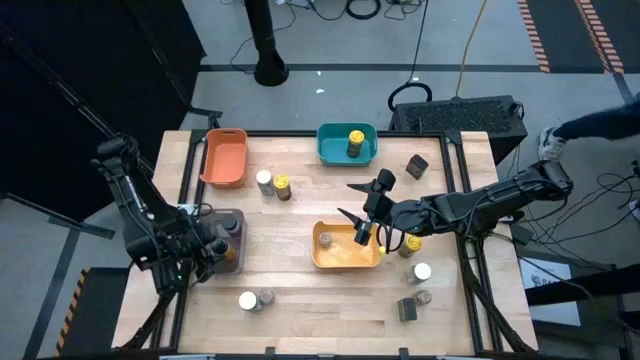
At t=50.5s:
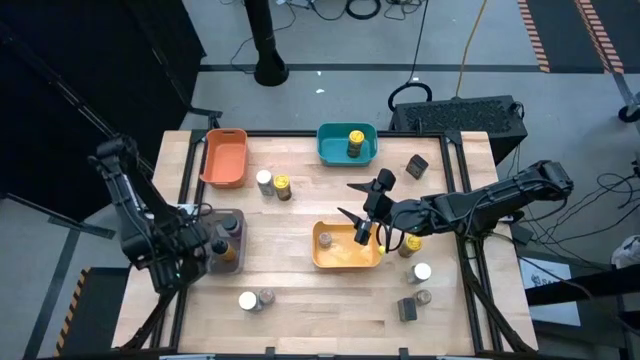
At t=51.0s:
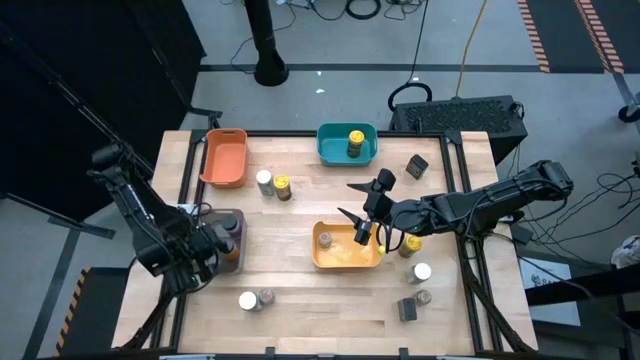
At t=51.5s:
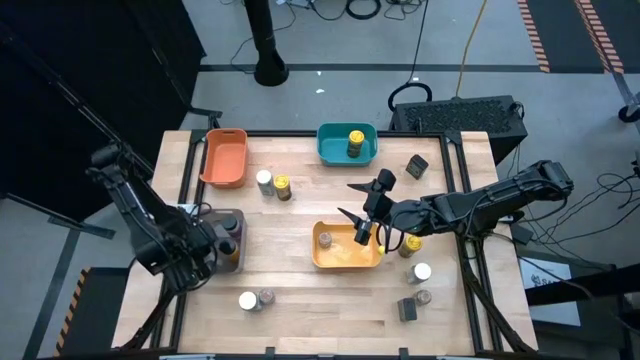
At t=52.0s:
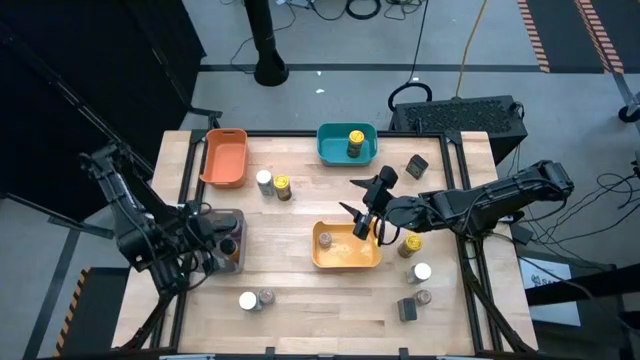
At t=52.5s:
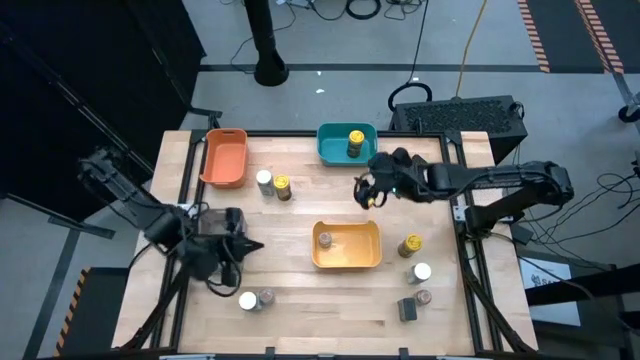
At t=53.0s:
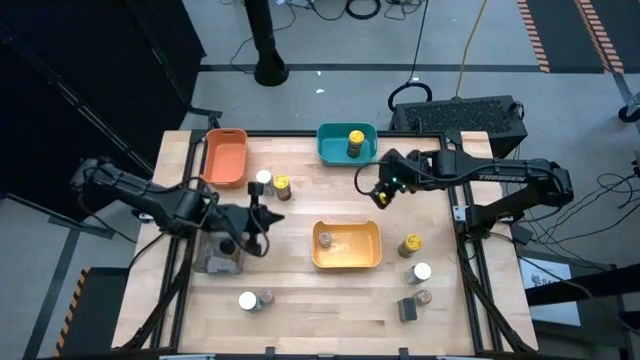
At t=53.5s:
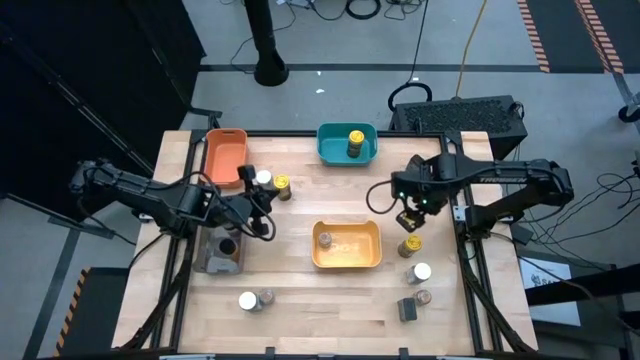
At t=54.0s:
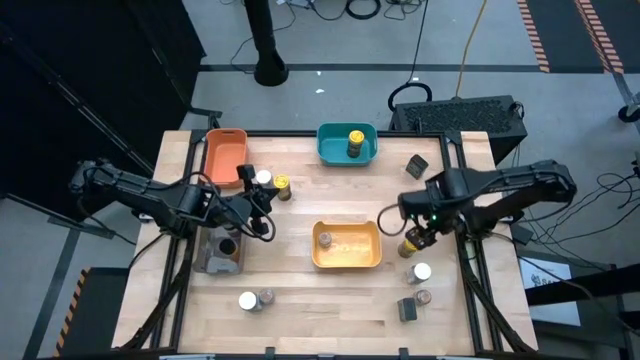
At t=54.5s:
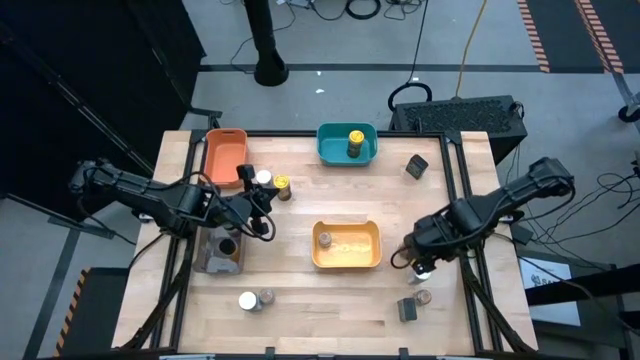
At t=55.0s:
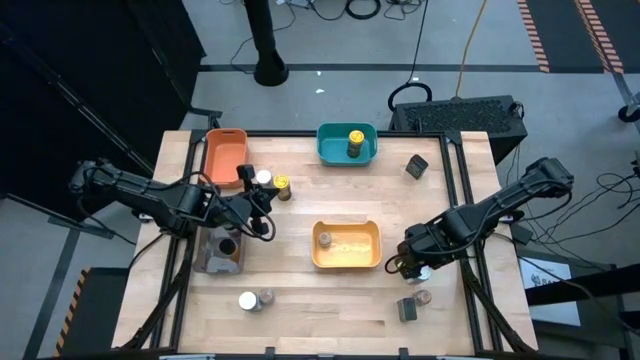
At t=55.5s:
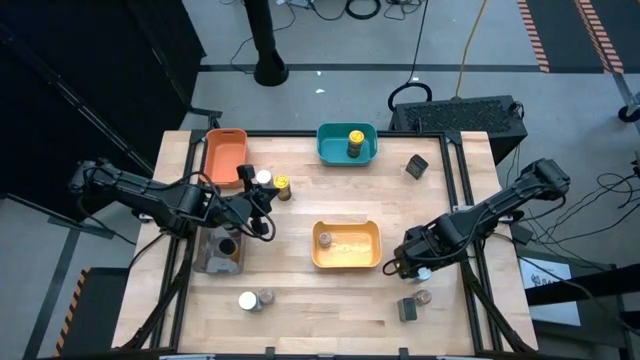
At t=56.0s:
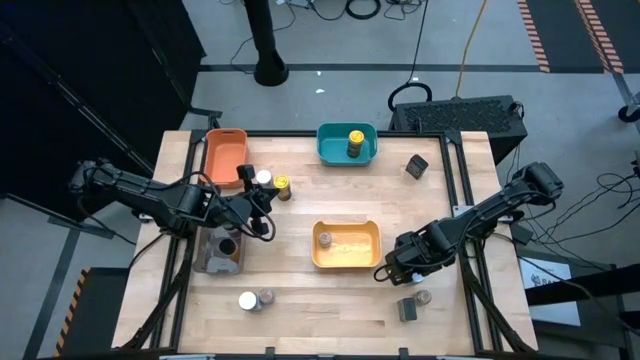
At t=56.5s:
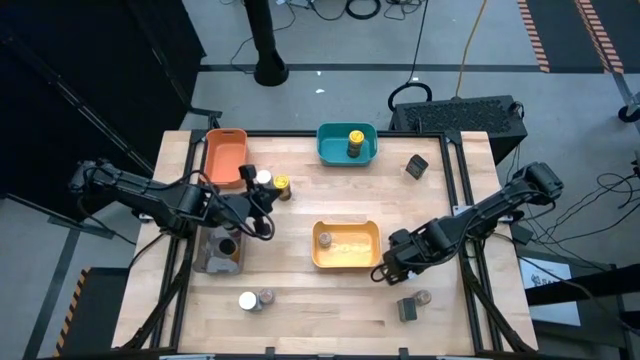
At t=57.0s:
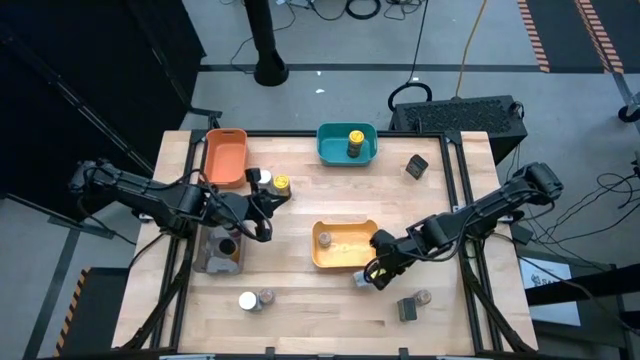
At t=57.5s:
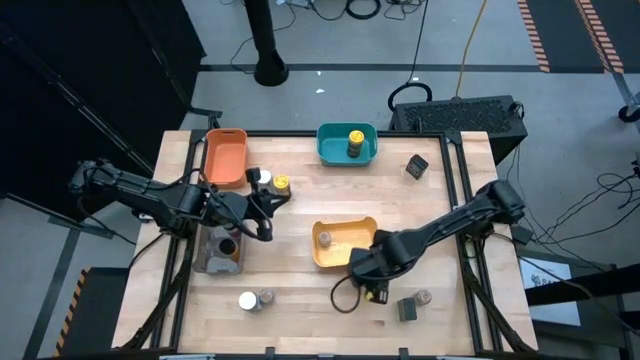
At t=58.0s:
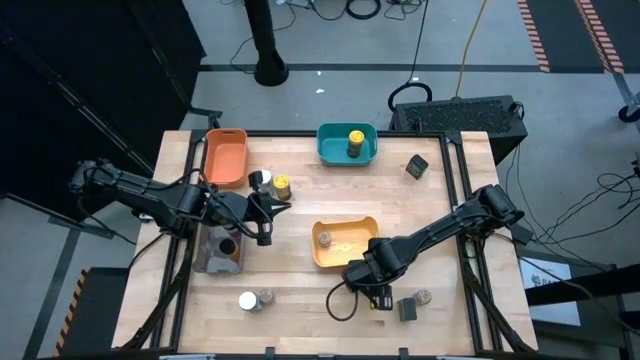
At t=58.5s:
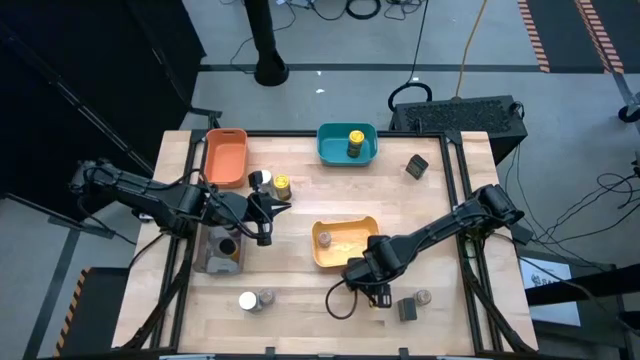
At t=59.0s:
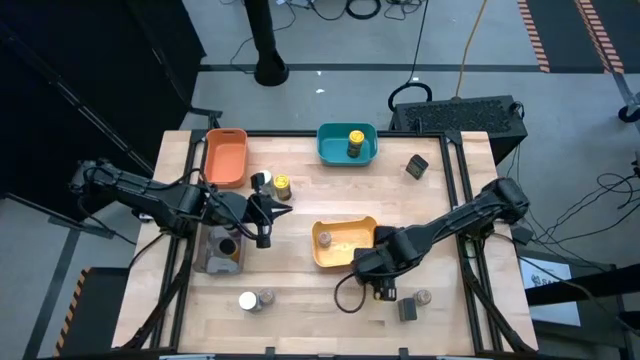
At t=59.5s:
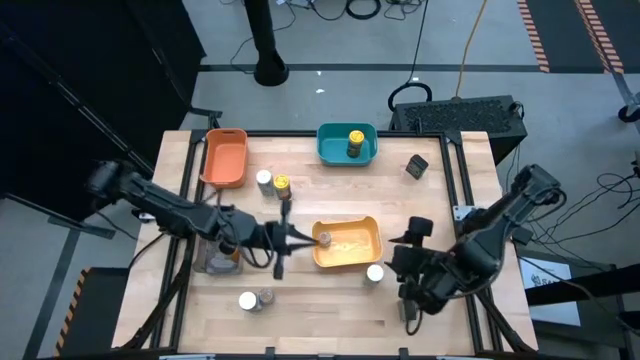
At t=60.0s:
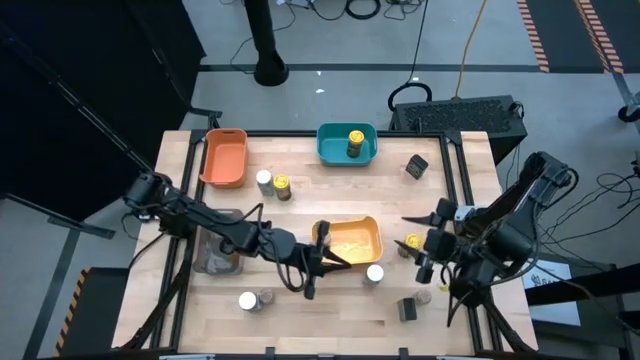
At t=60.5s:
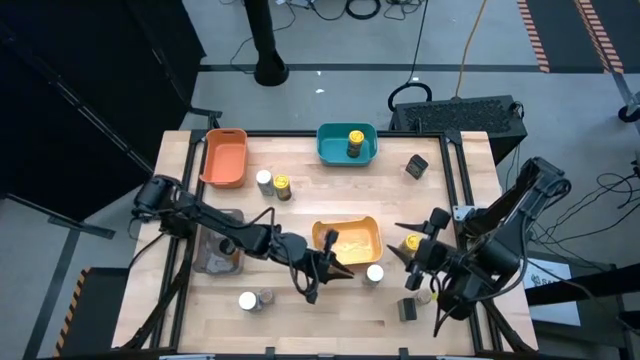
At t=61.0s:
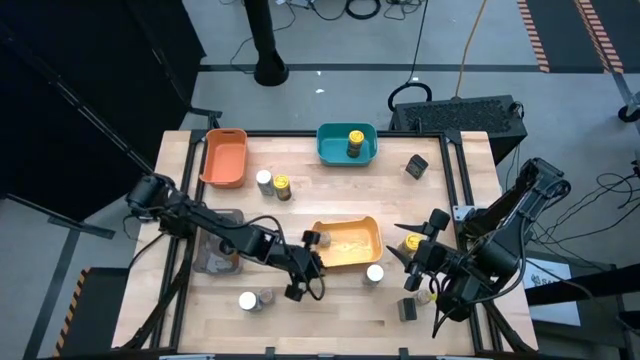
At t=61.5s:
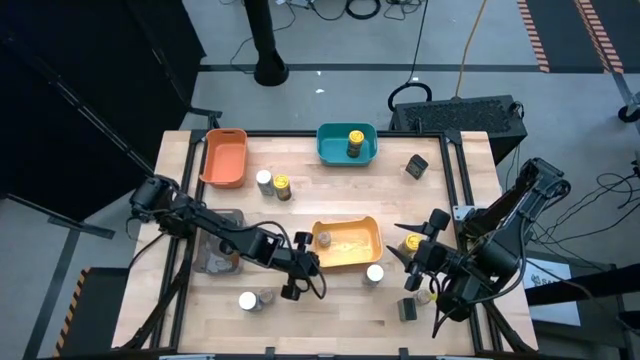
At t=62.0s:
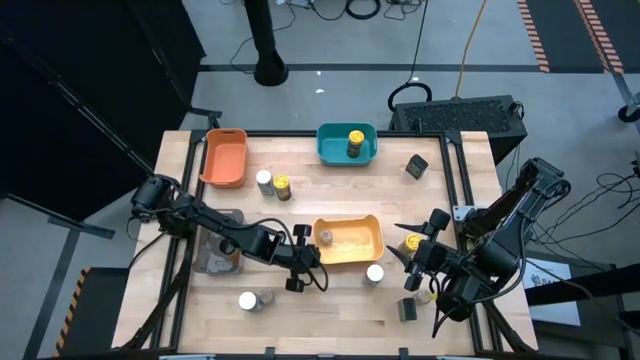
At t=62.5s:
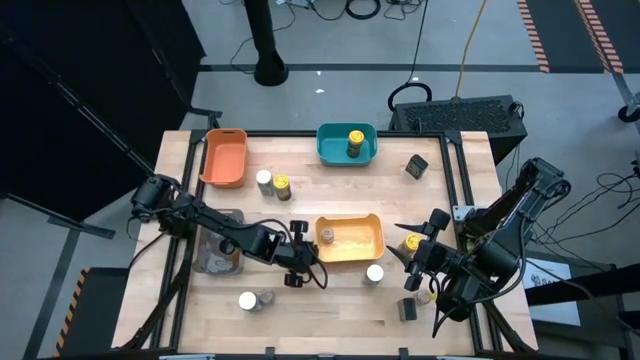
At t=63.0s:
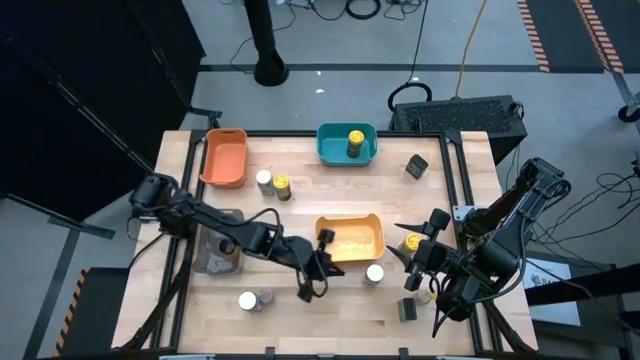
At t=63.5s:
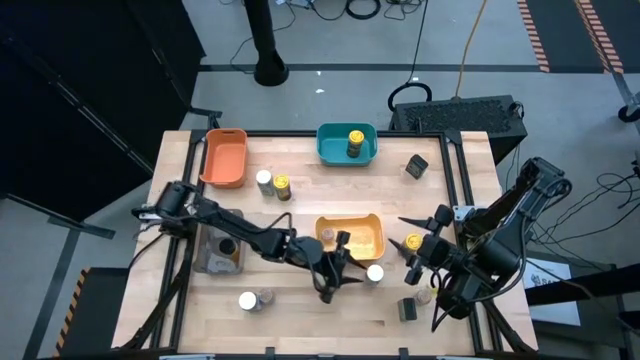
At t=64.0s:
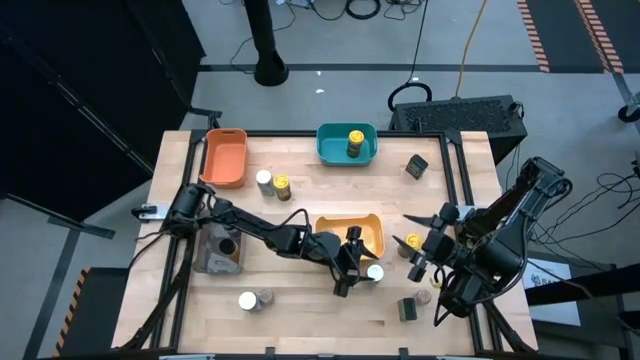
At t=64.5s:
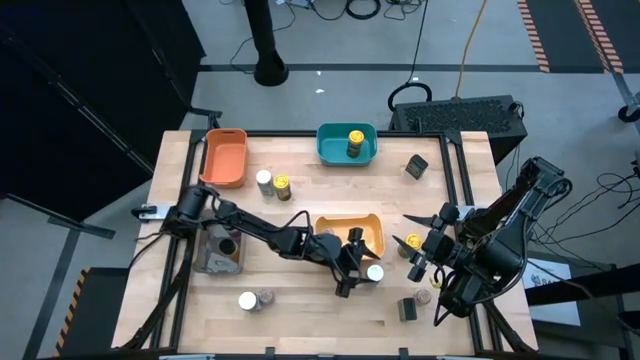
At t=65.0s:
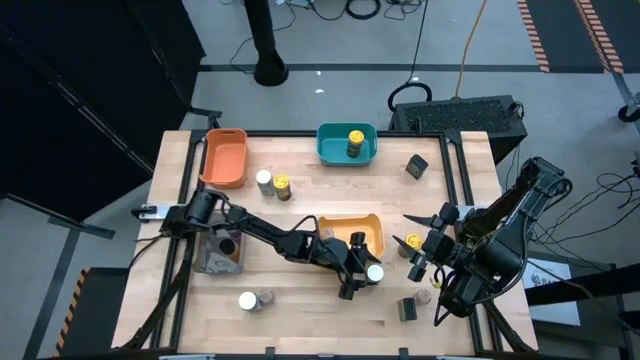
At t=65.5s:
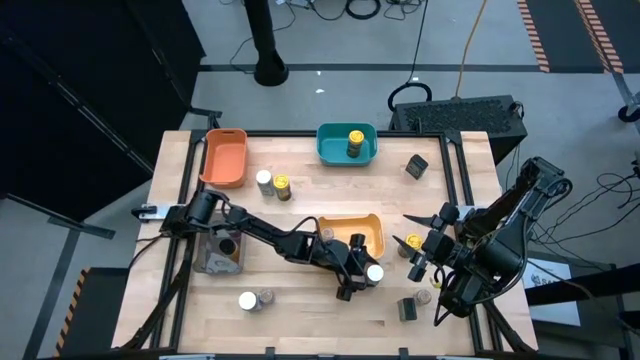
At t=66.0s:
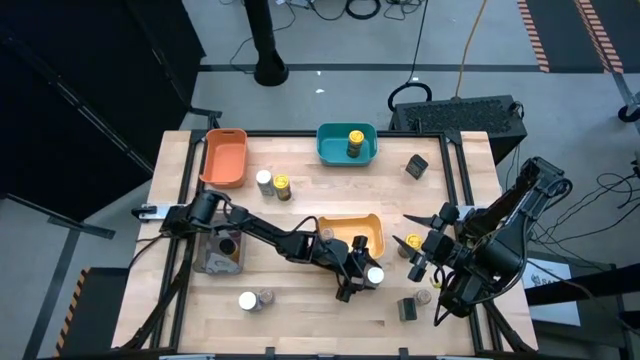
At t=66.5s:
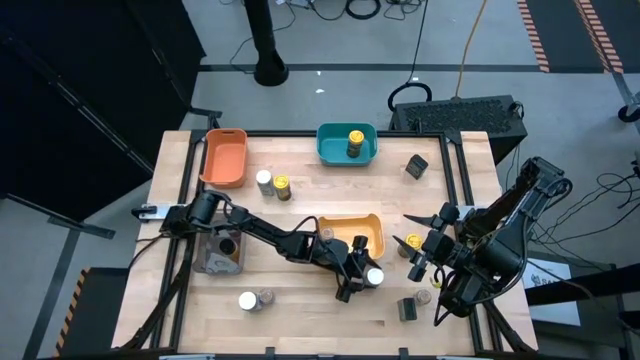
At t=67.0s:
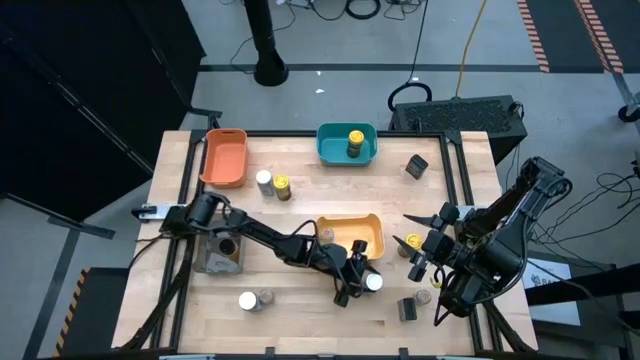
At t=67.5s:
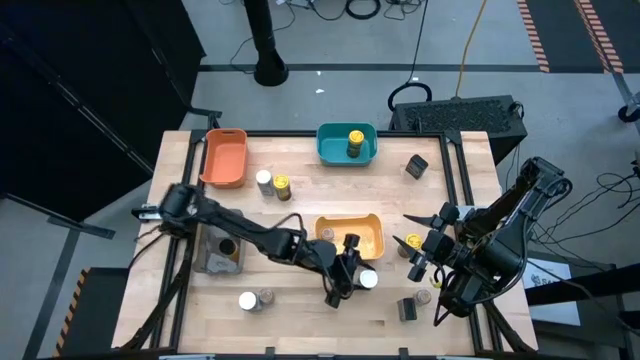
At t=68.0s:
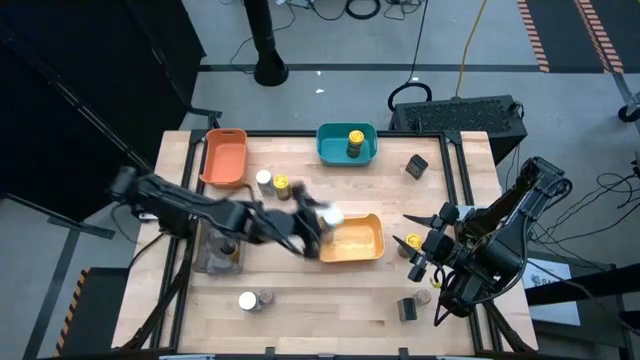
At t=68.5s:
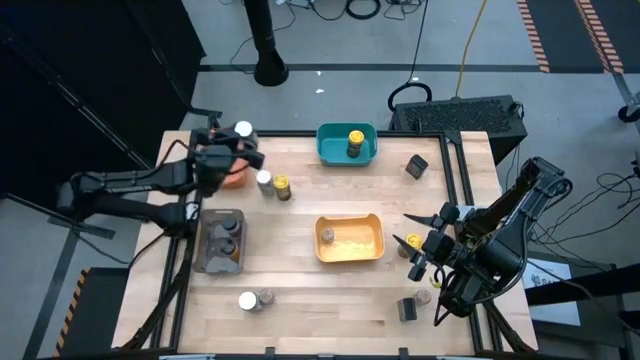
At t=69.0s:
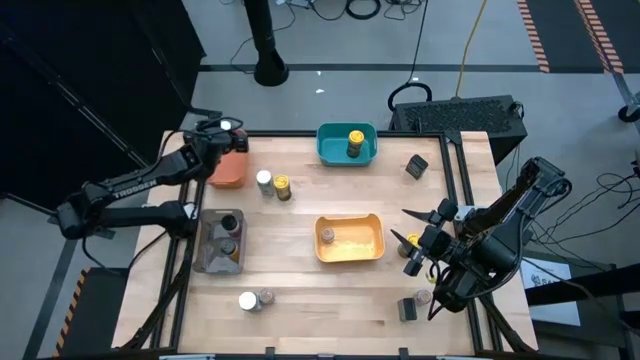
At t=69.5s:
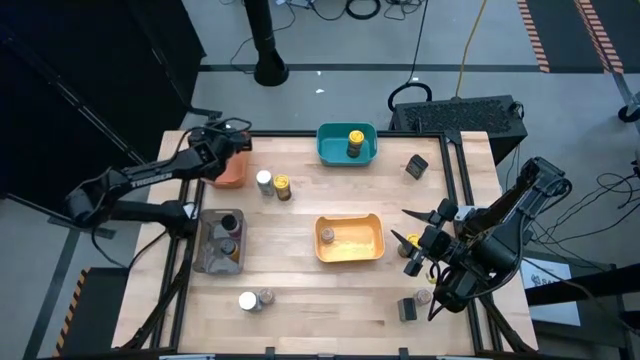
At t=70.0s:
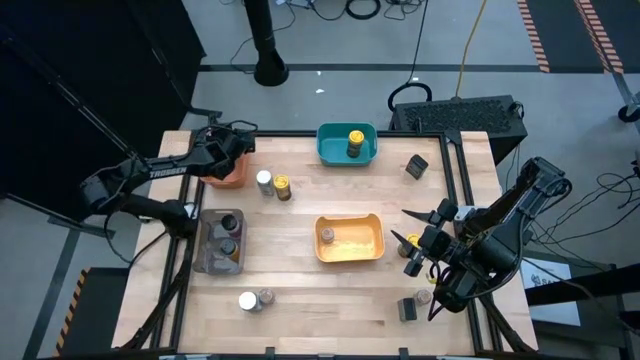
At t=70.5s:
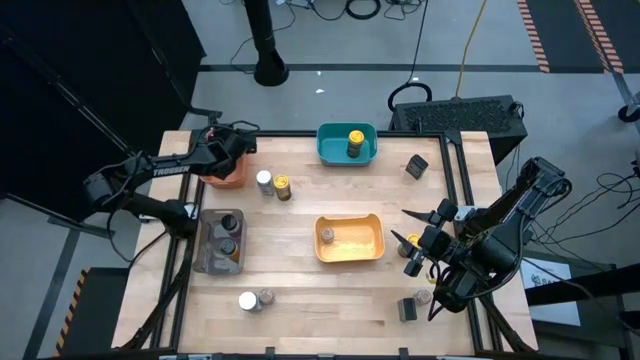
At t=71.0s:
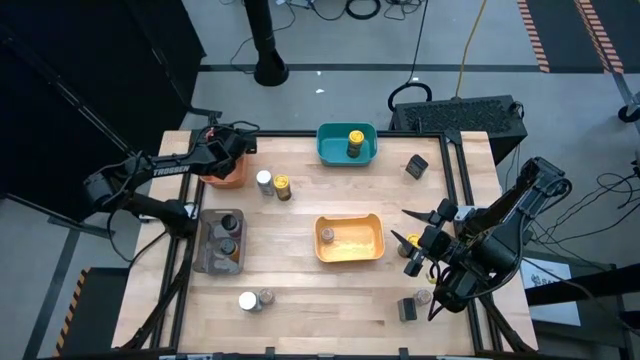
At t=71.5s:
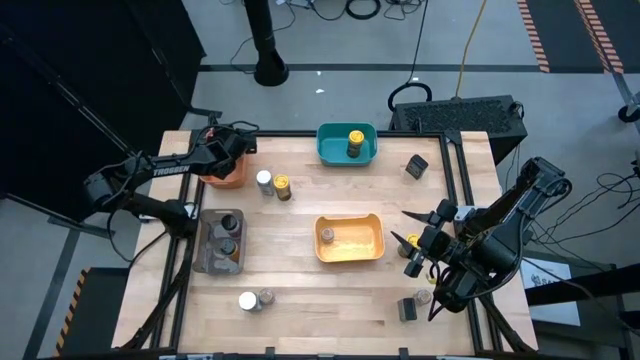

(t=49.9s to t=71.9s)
Task: Sort spices by type
Put the bottom right white spice bottle into the orange bin
